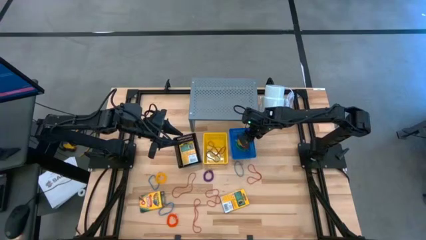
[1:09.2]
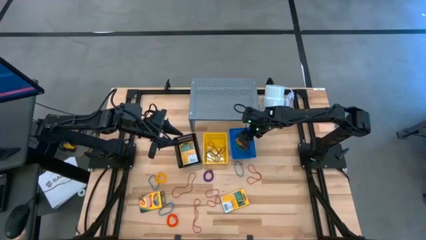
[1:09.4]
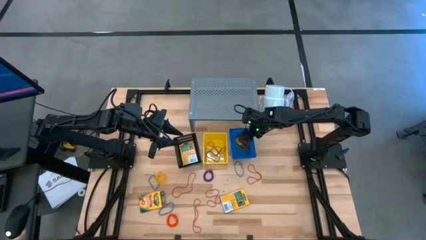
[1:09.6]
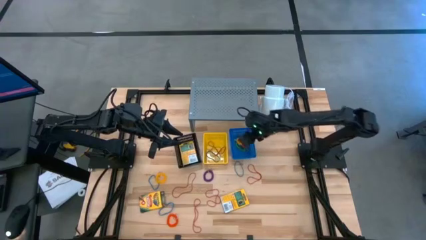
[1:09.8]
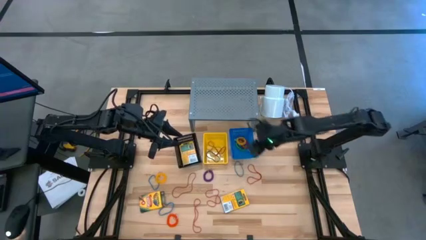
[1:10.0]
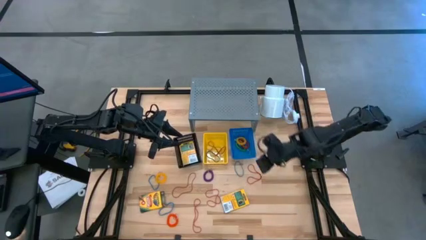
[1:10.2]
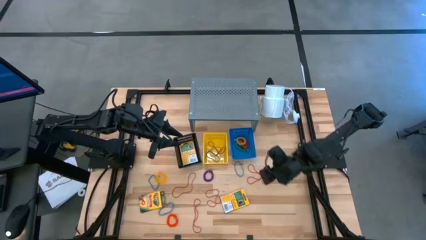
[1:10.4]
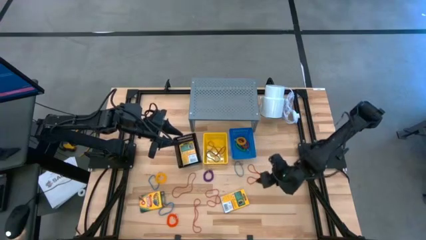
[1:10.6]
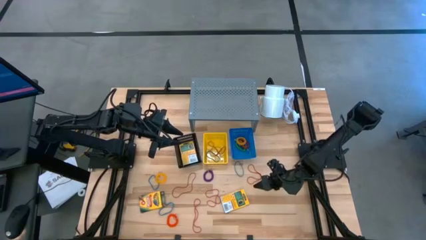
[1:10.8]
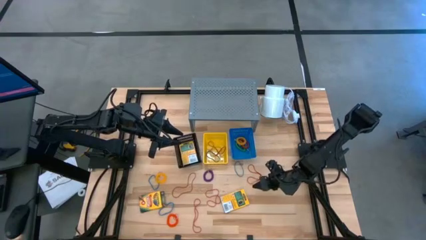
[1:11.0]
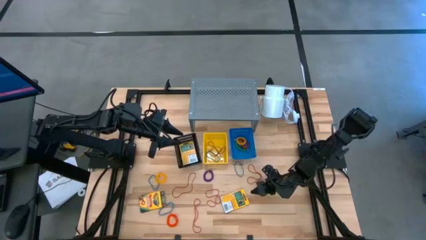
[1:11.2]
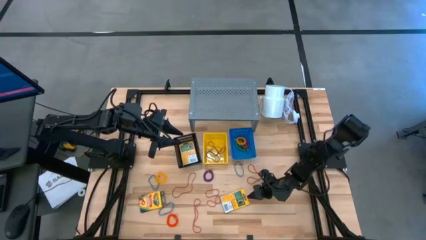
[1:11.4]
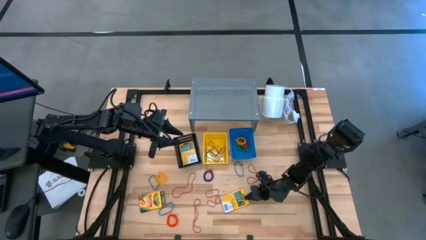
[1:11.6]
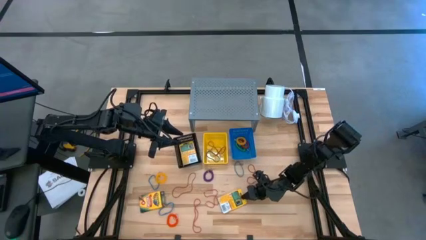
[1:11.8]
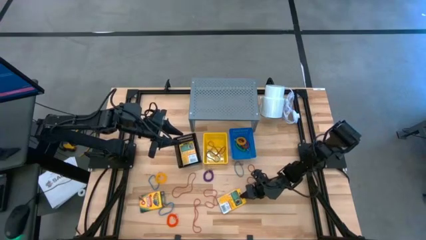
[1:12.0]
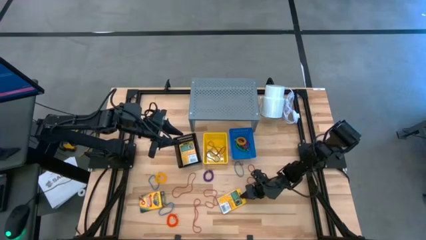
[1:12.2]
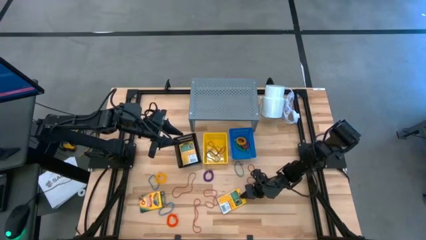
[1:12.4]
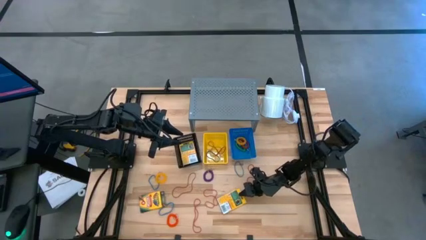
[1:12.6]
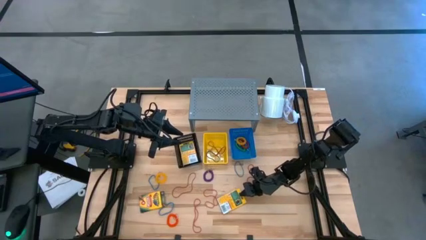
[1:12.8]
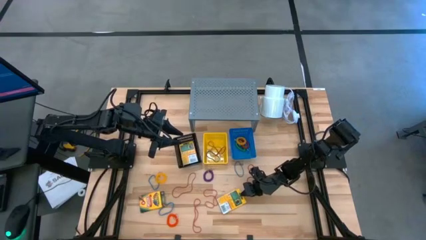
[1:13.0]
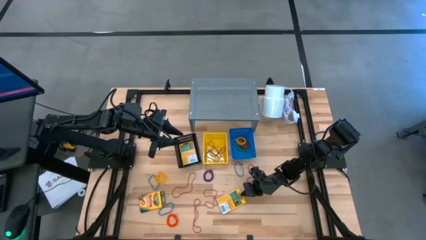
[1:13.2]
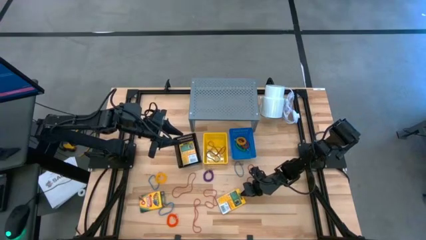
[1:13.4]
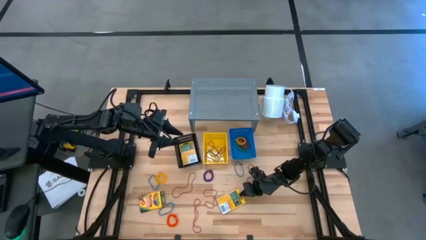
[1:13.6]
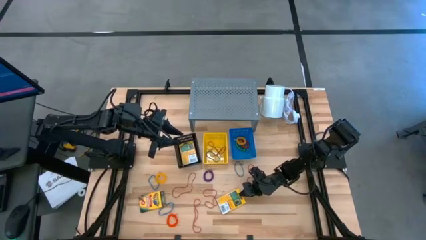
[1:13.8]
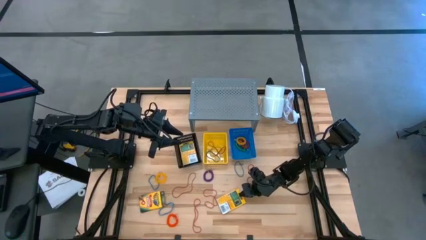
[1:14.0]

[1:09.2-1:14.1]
Task: Pick & Place Office Desk Supplies
Put the crayon box into the black basket

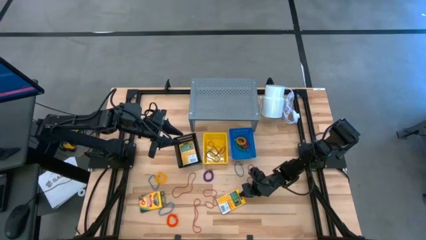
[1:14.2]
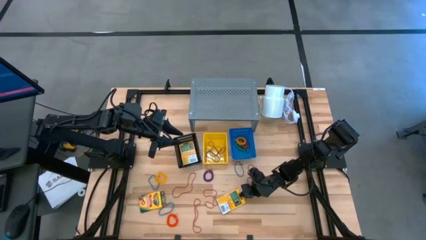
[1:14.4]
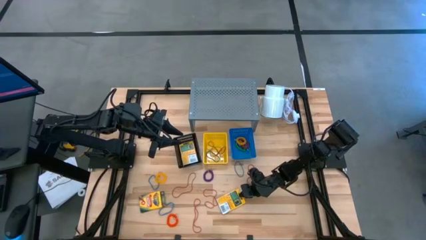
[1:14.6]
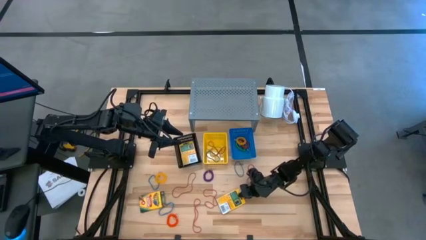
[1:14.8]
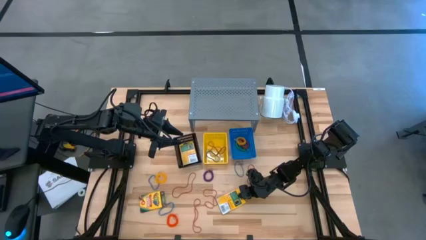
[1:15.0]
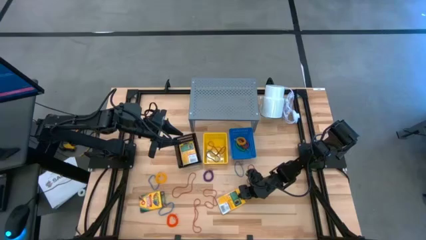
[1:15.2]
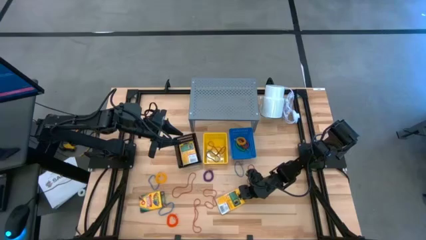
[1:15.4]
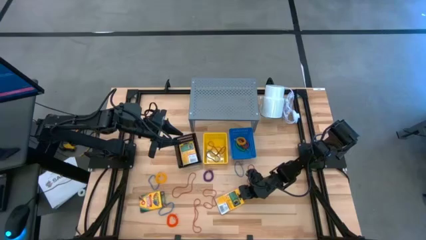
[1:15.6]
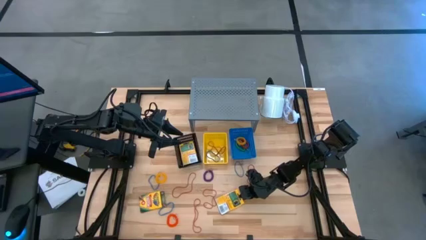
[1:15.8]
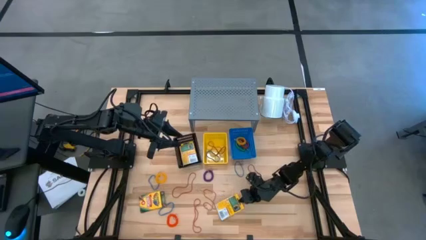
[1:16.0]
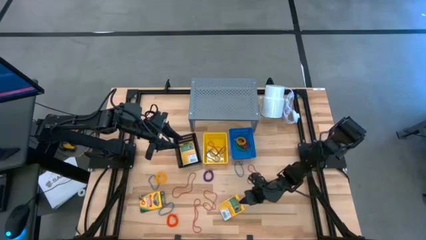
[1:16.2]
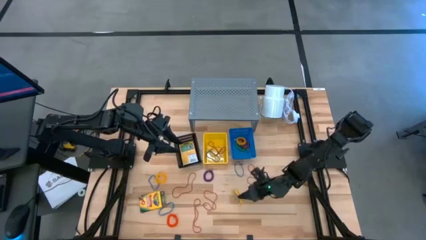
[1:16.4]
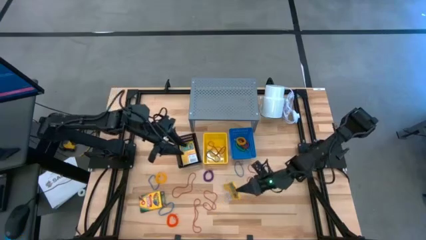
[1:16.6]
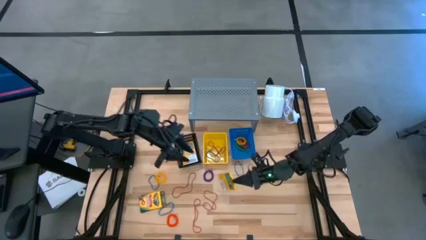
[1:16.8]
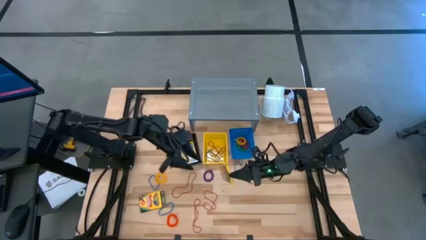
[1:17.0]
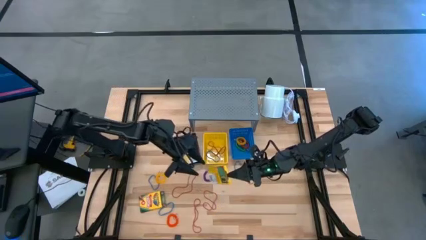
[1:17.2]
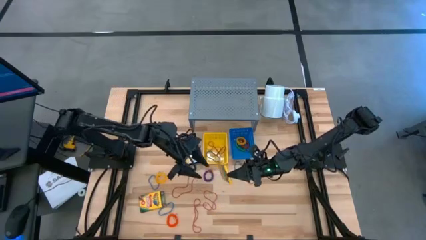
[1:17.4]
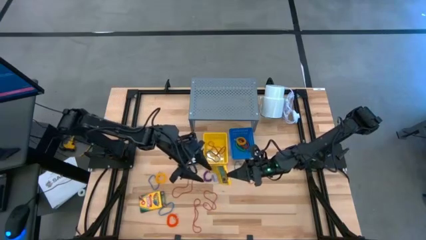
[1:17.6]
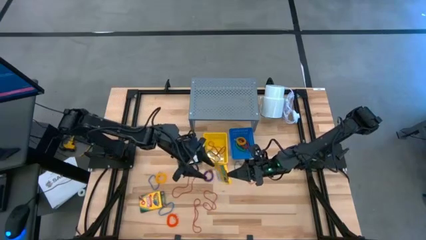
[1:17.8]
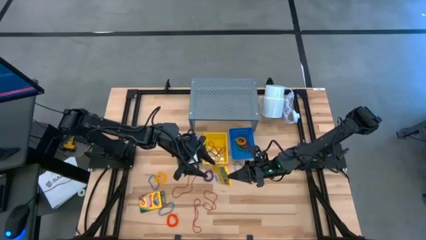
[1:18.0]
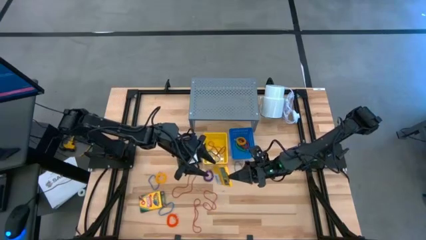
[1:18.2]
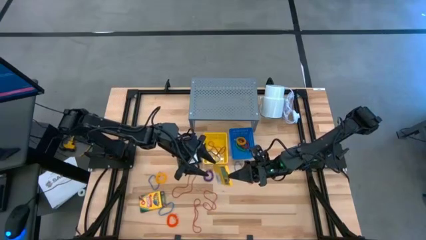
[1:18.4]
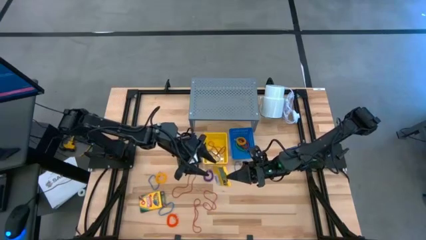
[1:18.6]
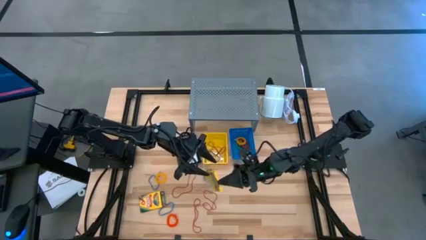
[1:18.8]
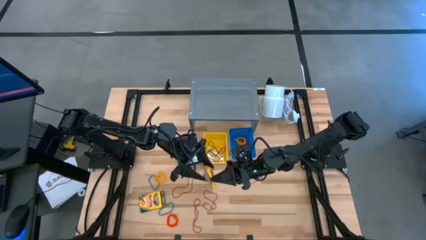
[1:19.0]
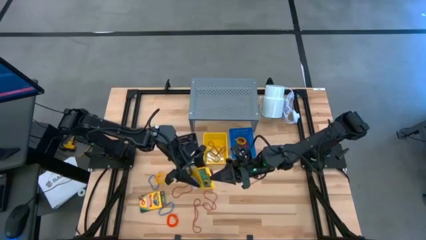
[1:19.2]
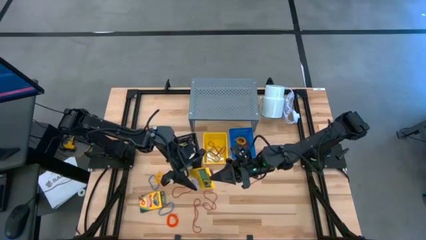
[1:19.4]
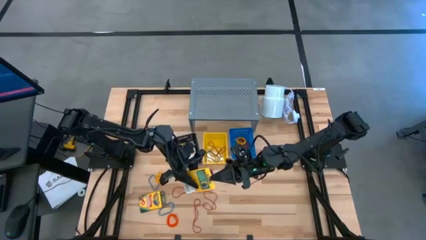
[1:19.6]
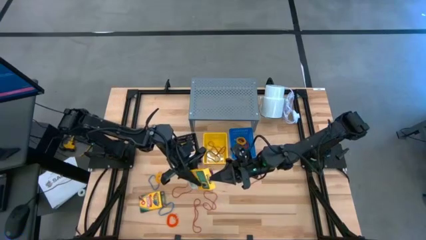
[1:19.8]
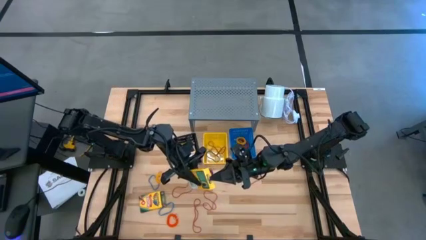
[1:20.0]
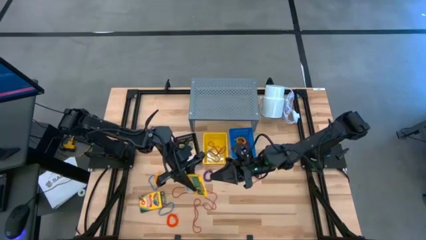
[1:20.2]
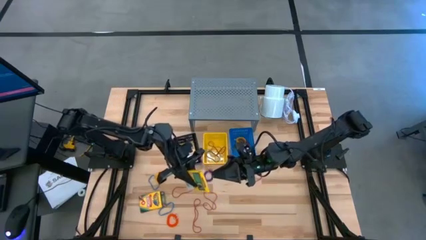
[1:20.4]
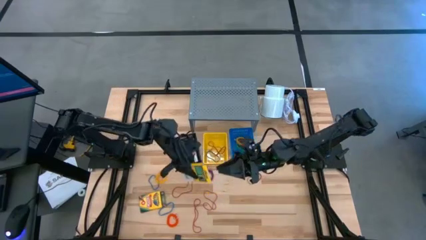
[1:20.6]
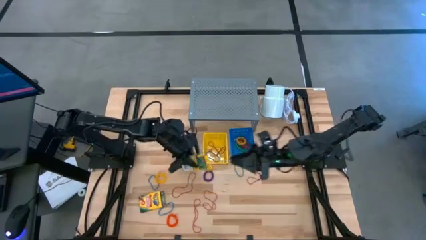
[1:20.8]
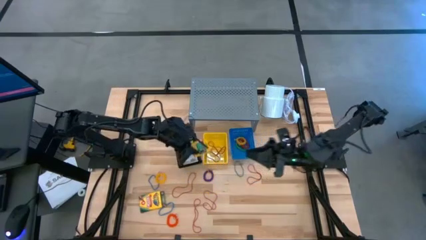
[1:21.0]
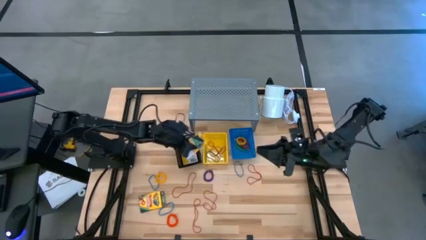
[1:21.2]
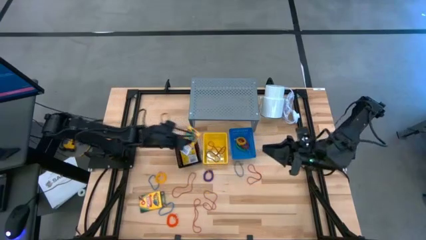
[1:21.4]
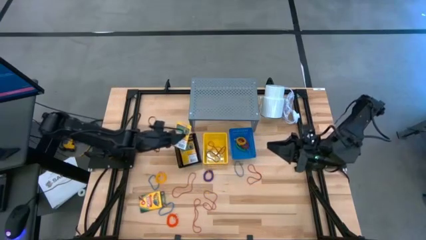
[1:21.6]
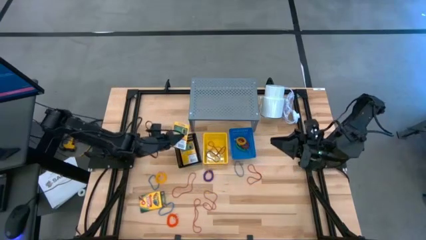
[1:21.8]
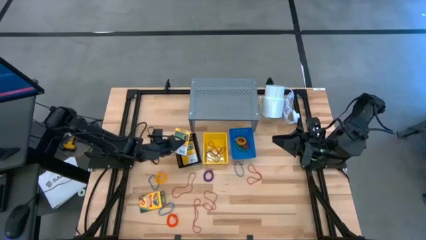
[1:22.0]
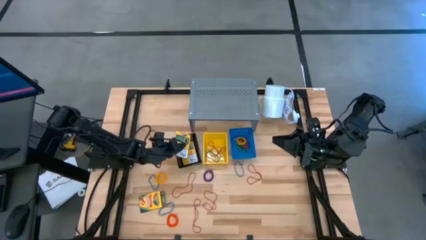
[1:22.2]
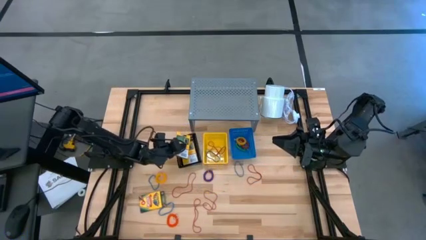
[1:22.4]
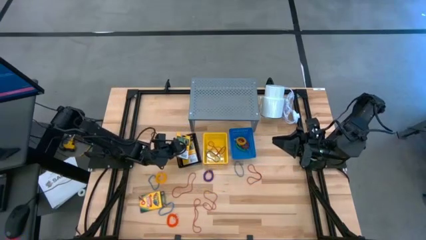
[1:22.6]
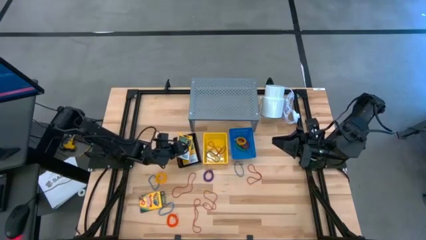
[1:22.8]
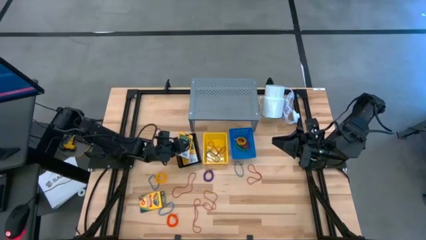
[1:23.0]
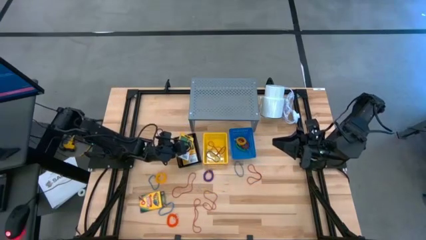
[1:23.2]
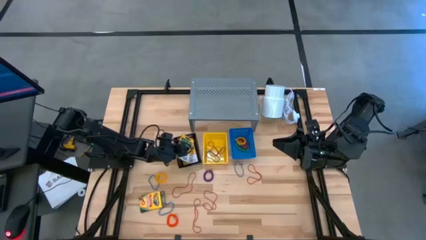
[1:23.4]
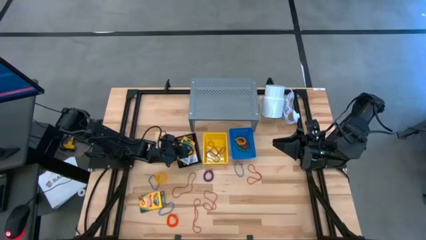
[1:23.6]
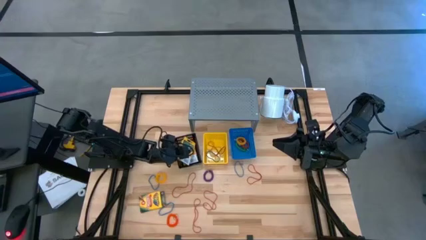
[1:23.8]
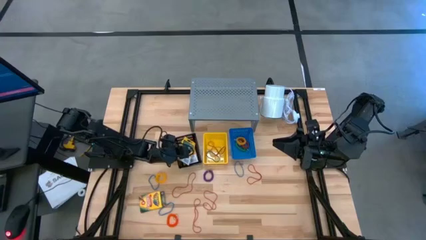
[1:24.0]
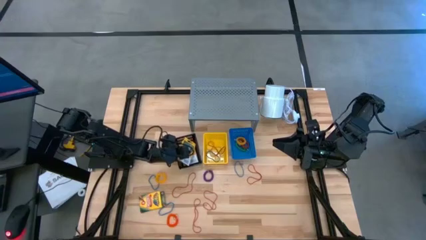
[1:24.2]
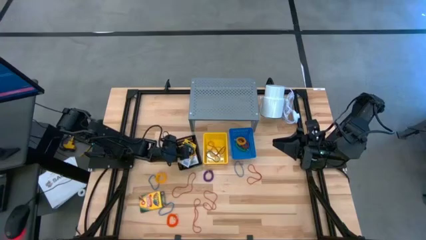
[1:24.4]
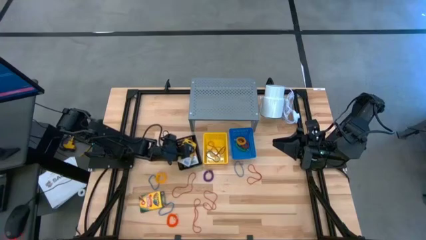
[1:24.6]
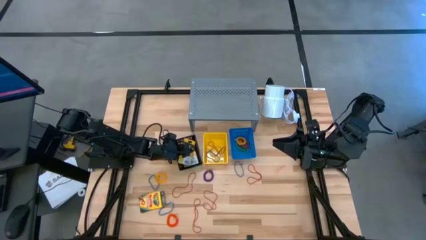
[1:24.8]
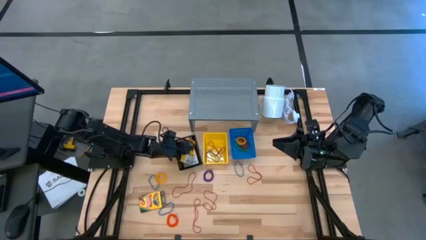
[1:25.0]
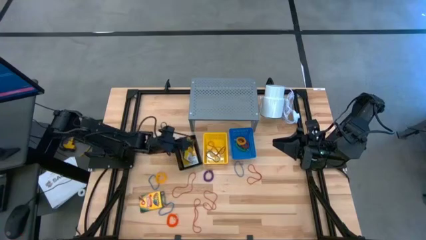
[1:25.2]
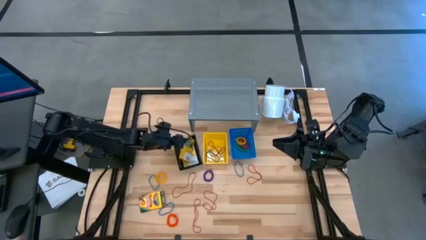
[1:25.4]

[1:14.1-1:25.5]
Put the crayon box into the black basket

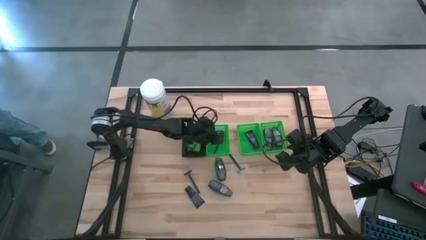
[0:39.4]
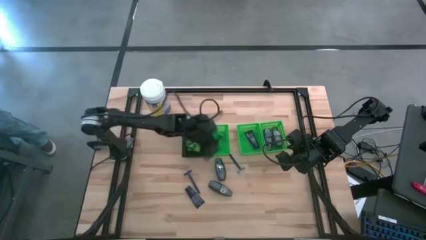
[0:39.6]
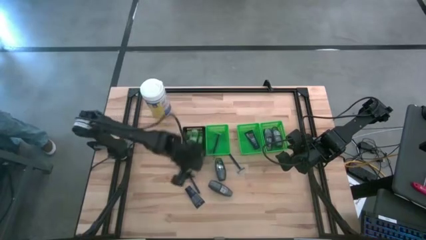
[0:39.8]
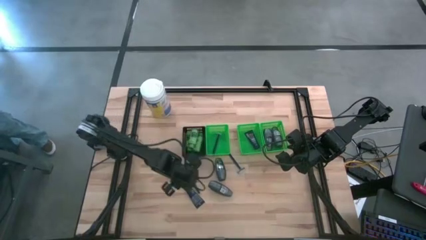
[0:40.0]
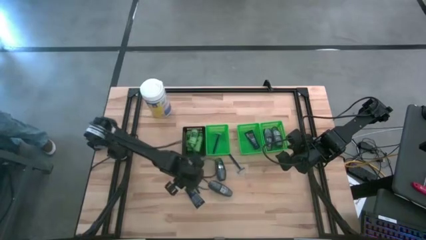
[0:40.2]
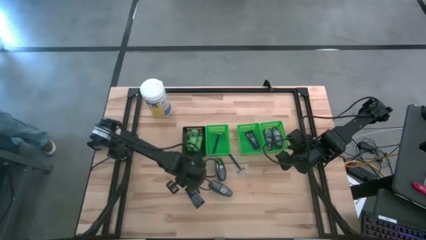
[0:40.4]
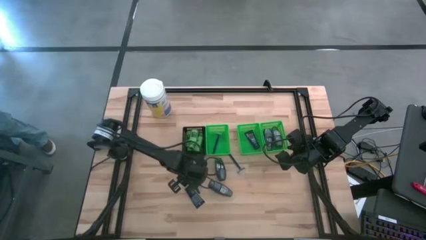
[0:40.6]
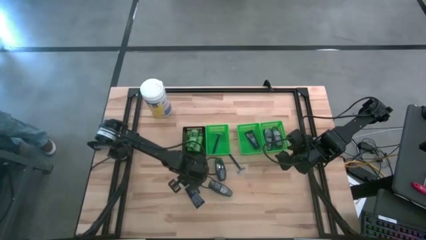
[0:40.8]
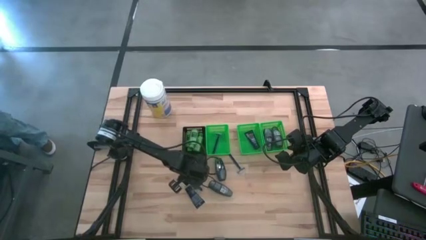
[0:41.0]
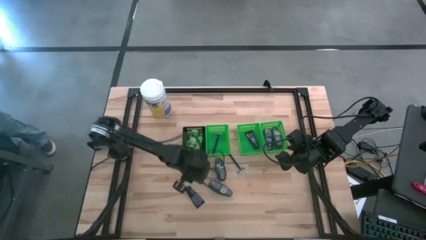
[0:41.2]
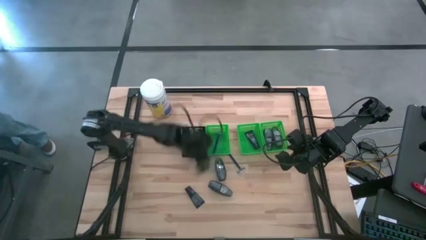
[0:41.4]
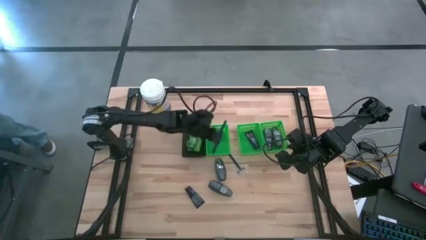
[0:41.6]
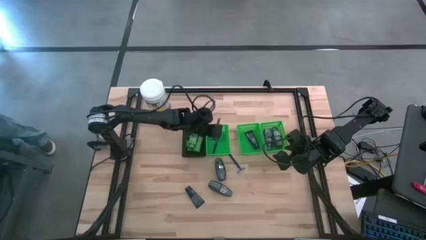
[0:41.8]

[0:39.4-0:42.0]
Task: Pick & Place Travel size toiletries
Put the blue razor into the left green bin
